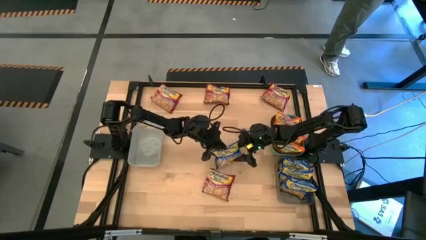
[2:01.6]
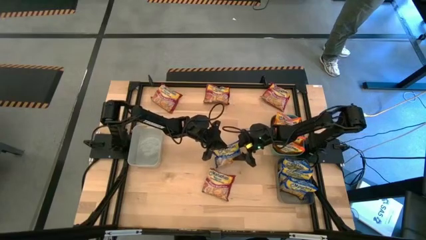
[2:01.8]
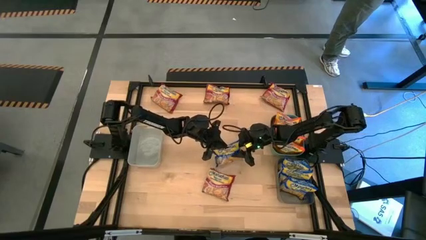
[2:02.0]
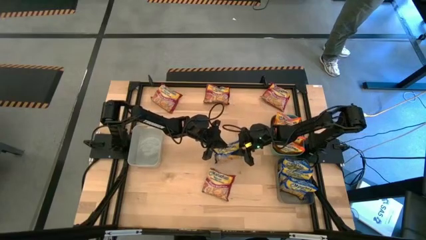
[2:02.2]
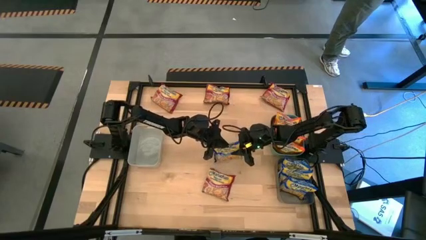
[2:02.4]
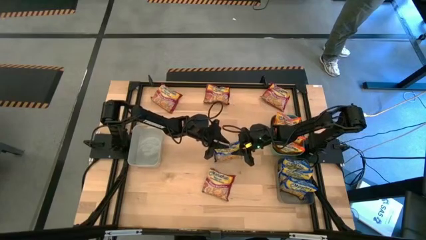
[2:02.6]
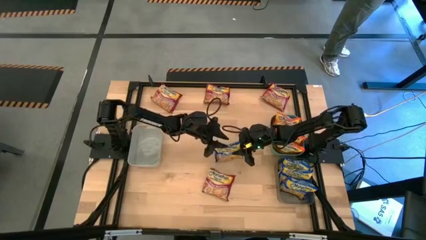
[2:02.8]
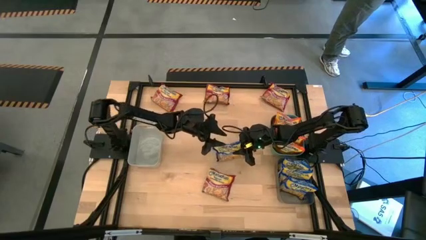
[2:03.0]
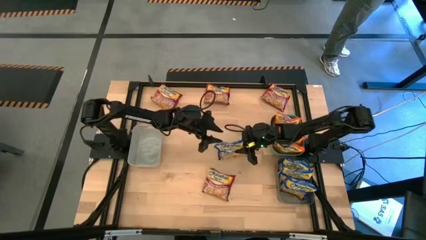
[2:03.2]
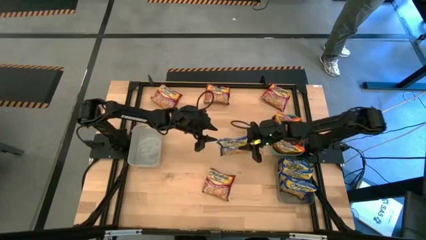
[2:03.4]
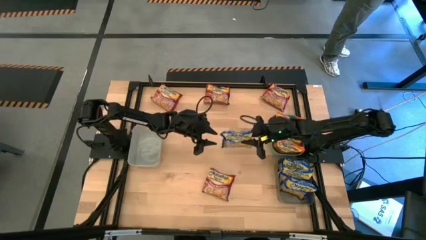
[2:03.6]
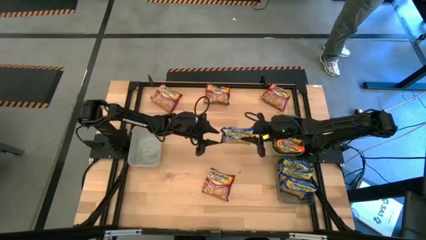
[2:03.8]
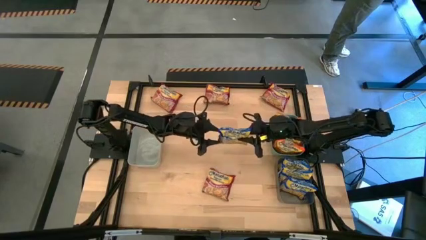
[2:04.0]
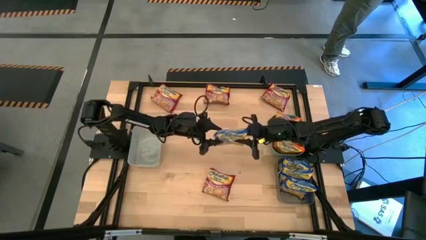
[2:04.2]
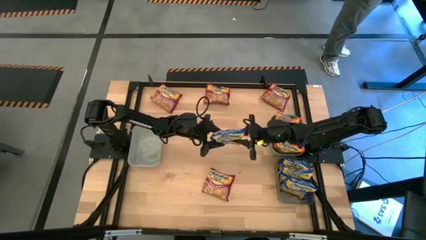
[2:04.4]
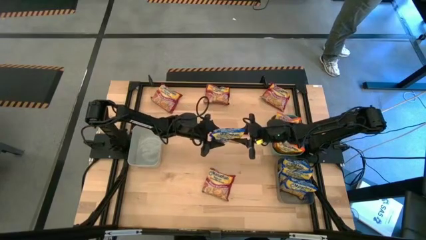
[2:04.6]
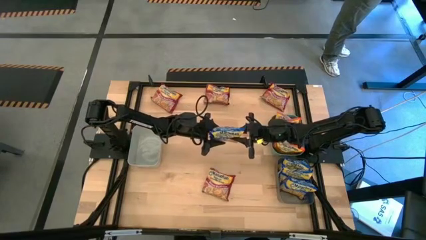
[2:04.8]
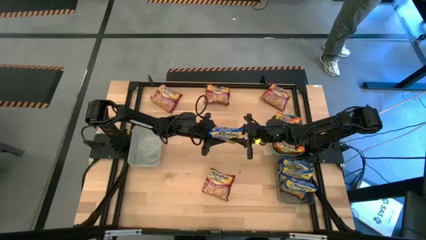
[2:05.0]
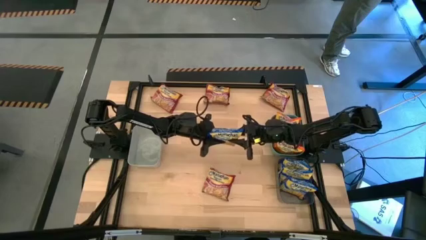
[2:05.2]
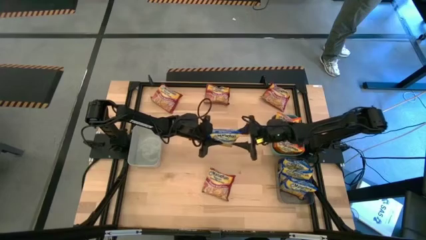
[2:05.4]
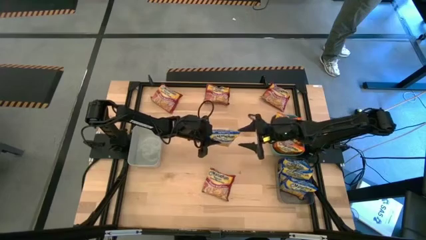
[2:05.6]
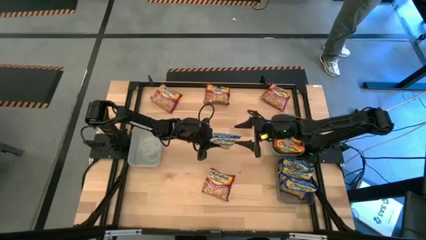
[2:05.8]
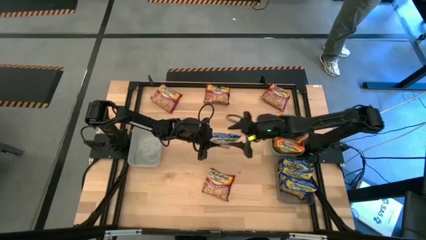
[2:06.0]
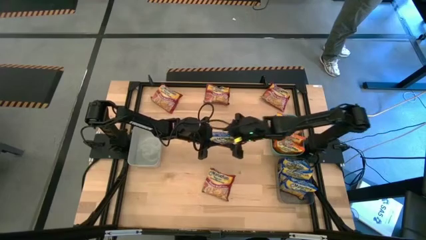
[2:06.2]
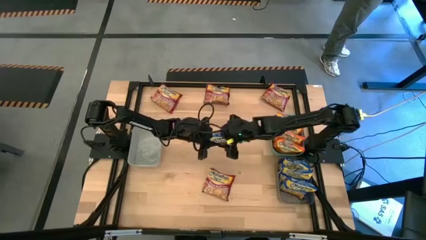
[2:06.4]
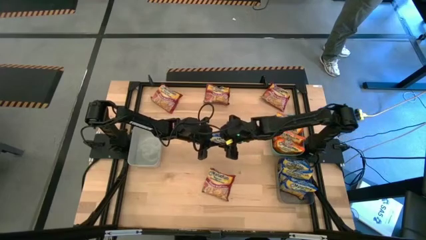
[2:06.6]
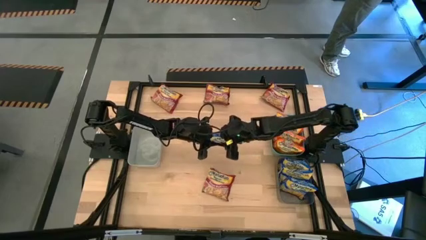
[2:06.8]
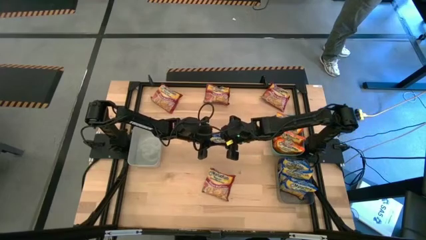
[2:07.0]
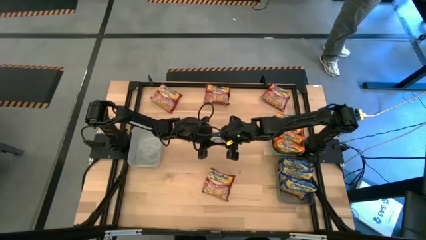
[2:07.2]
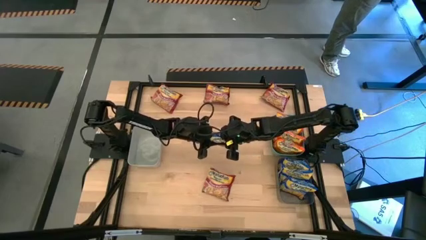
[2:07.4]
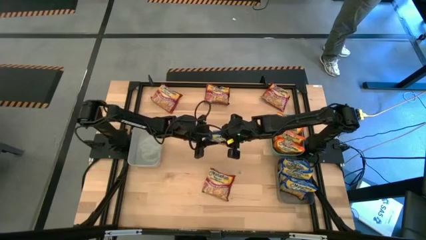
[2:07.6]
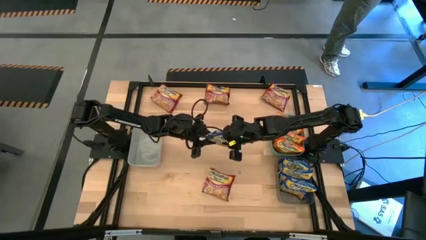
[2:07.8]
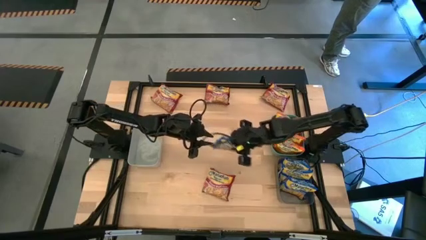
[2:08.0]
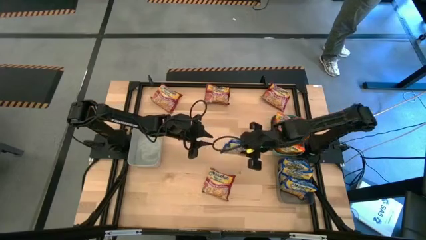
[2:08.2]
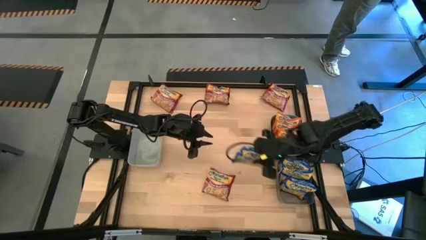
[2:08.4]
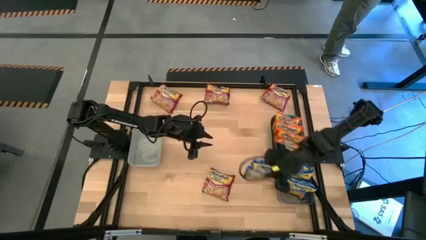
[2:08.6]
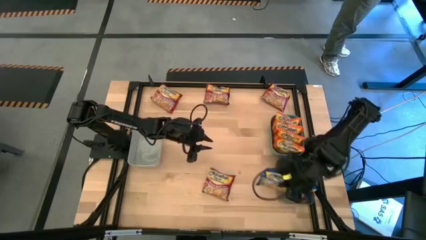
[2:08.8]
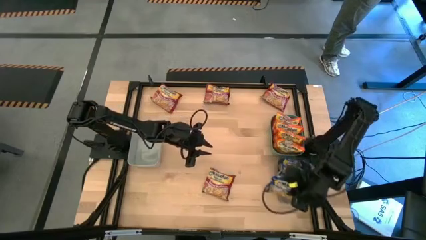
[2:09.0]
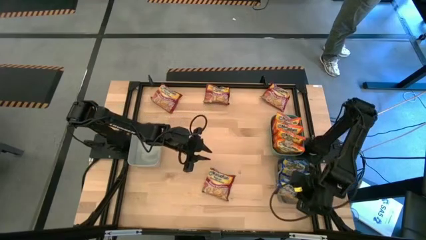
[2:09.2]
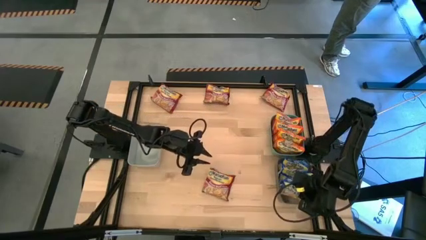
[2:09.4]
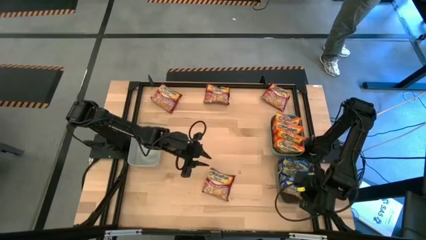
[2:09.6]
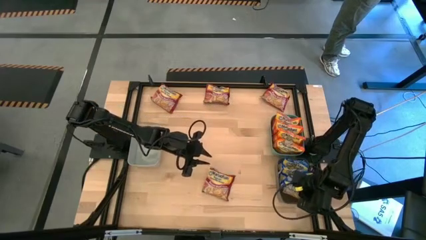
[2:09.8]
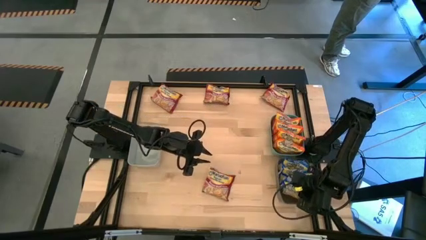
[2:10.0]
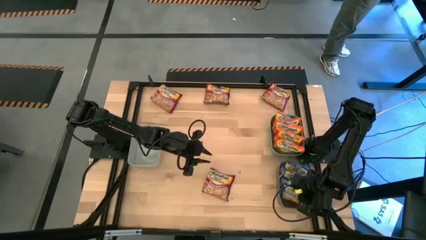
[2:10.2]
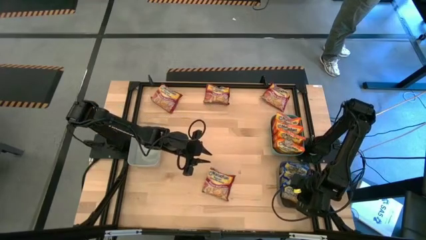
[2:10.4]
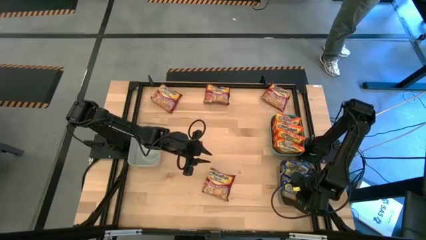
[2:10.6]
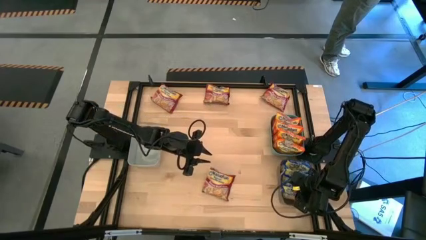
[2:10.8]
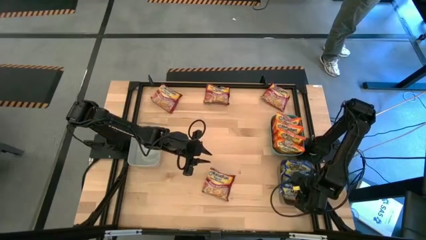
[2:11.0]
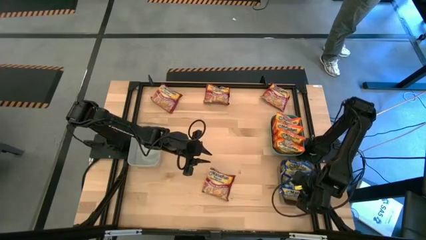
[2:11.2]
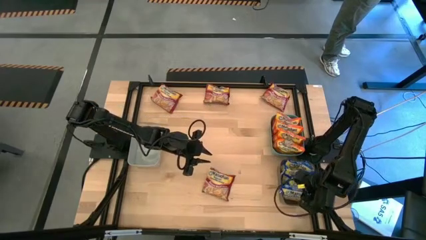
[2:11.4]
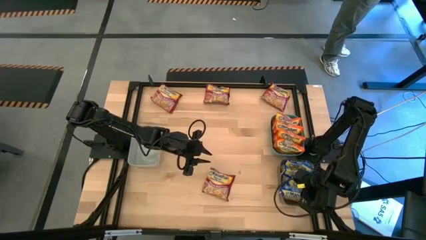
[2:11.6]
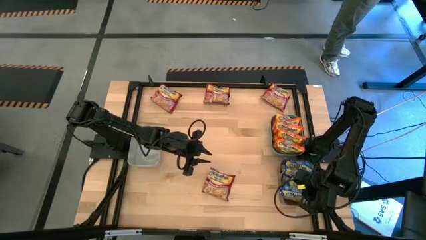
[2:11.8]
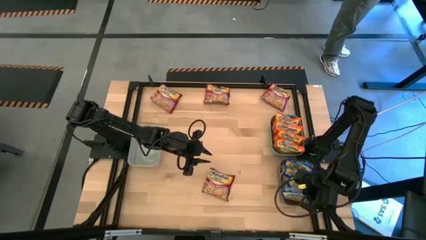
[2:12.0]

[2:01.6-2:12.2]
Task: Sort Maruchan noodles
Put the blue noodle pack into the black bin

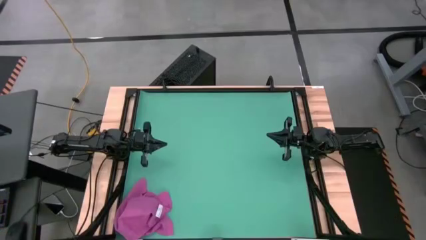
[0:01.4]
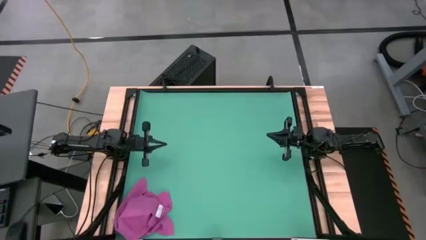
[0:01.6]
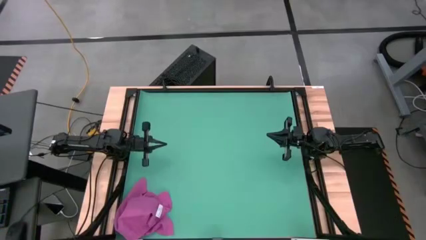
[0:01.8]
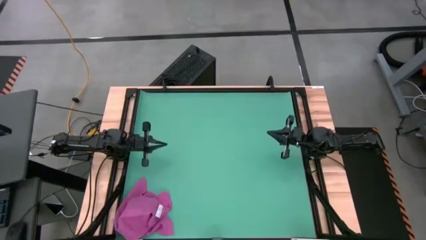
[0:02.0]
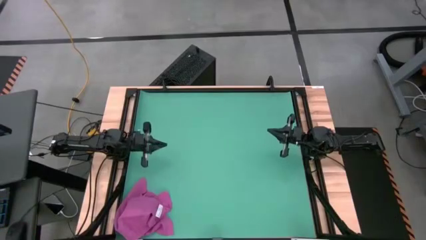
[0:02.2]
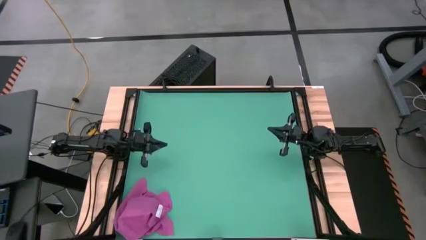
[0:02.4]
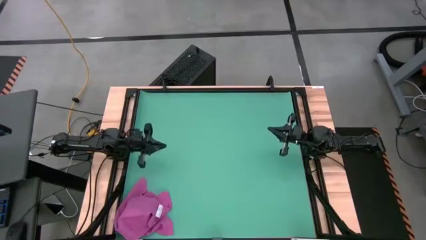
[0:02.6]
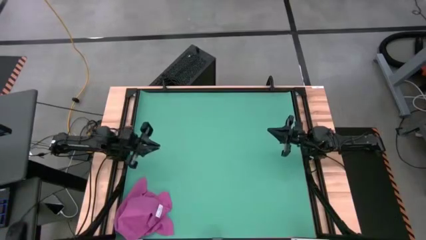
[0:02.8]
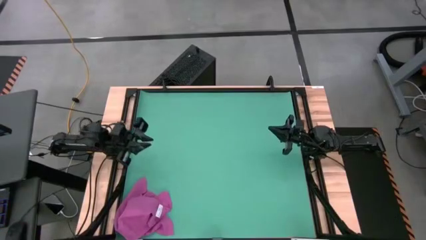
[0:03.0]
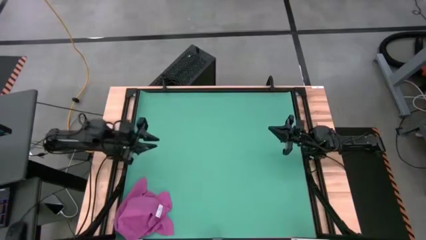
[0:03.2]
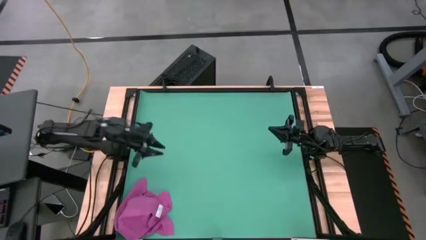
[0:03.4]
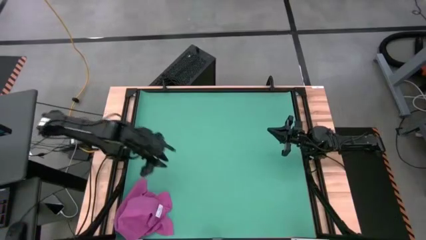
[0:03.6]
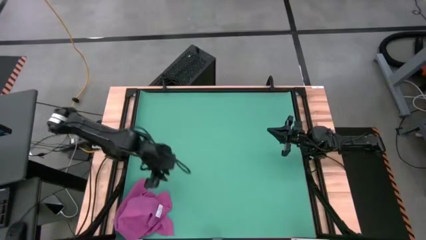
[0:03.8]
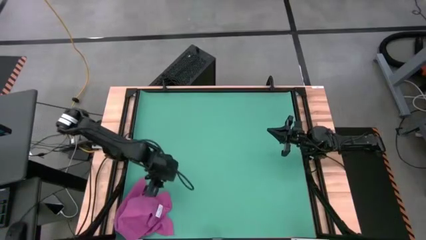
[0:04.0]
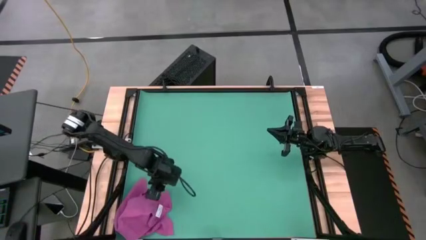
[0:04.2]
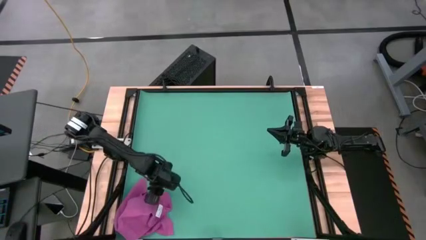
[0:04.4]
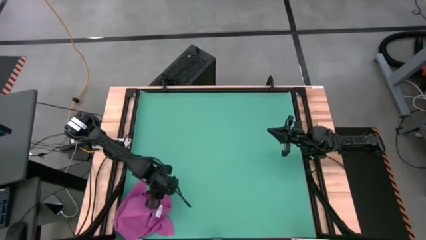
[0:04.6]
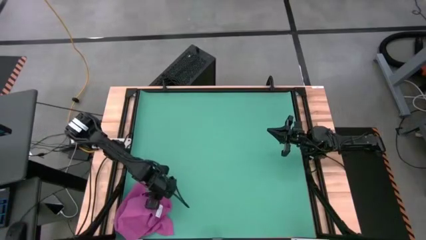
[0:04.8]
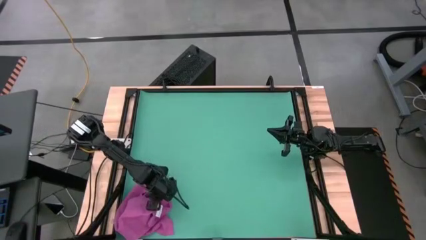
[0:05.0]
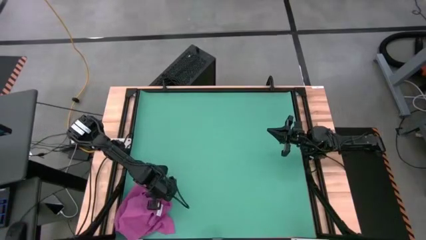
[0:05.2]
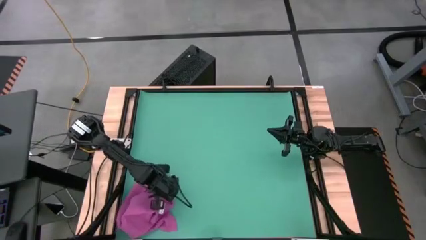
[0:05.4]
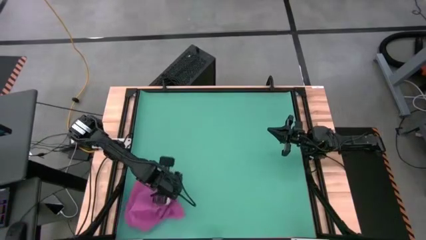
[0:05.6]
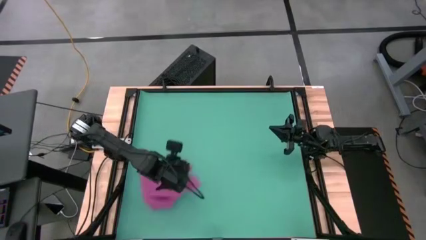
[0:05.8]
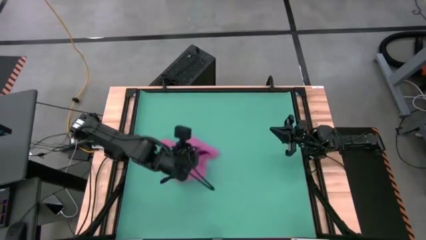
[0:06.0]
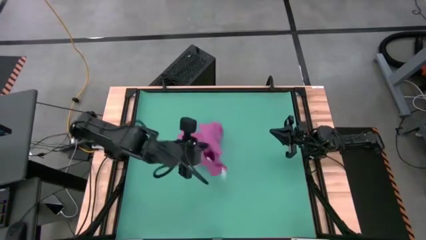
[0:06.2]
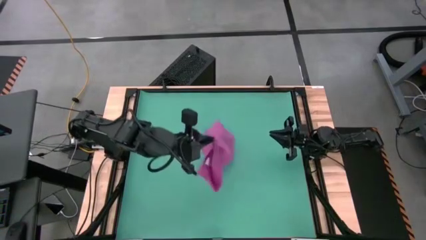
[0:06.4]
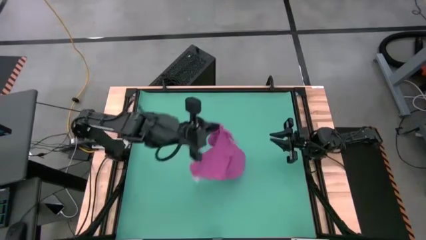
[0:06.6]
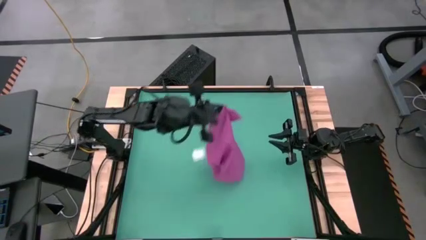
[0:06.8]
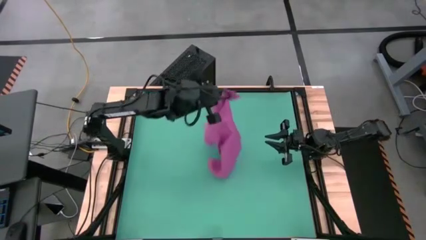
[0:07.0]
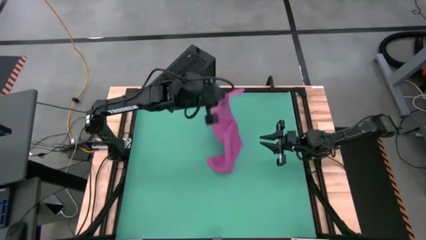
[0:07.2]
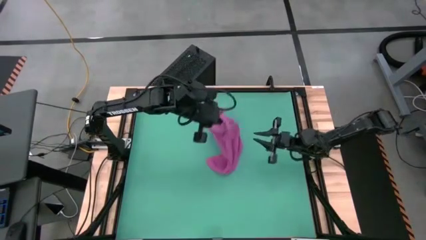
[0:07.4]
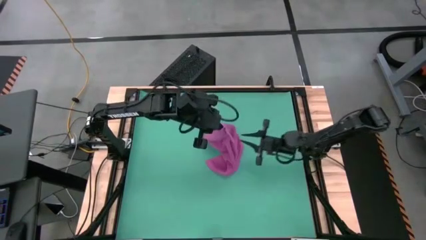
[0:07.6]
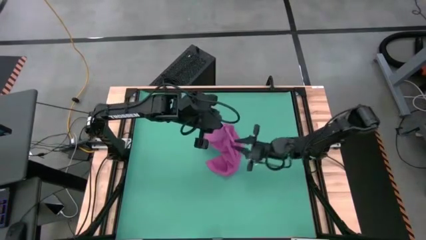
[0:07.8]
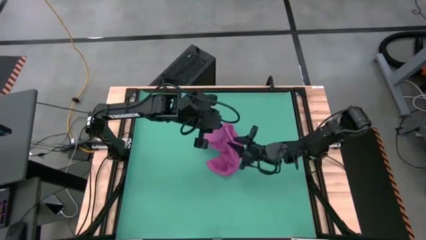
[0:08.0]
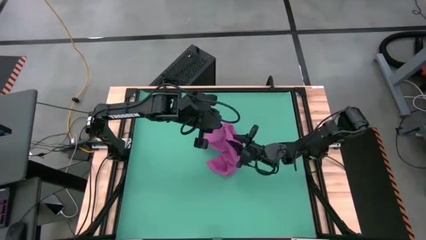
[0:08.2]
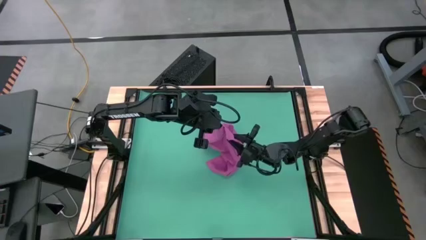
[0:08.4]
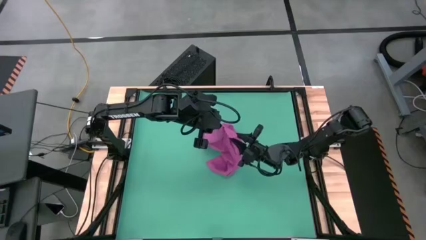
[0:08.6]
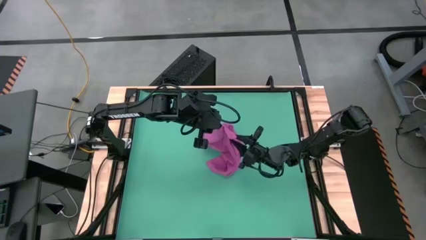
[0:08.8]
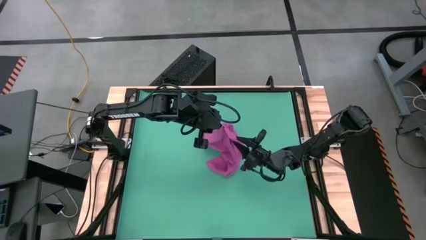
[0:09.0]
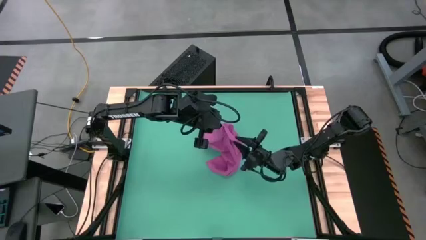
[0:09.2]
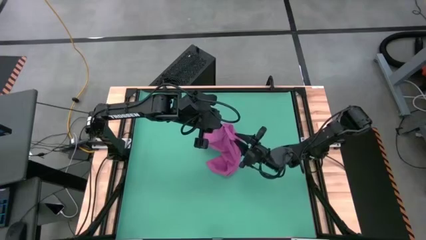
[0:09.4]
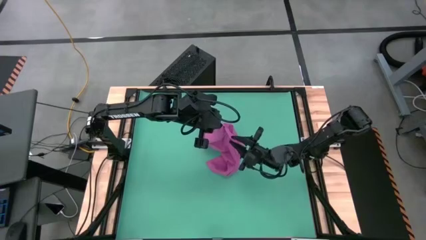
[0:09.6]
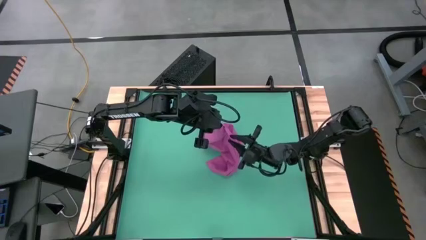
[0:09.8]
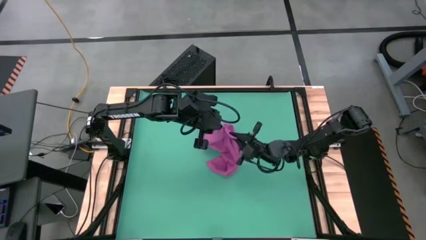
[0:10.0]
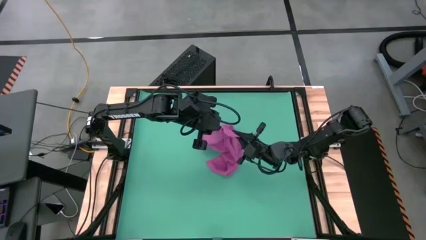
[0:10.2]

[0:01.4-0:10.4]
Task: Roll towel into tight, uniform cylinder
Roll the pink towel
